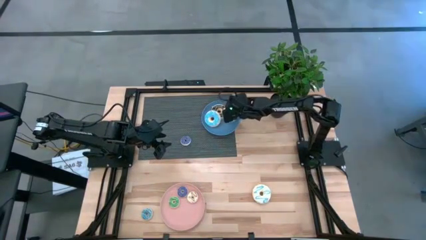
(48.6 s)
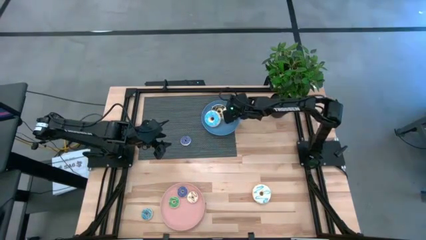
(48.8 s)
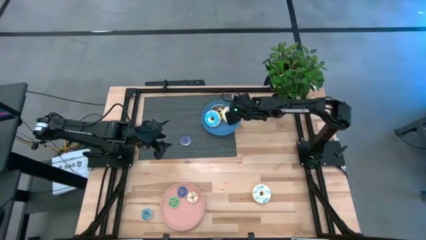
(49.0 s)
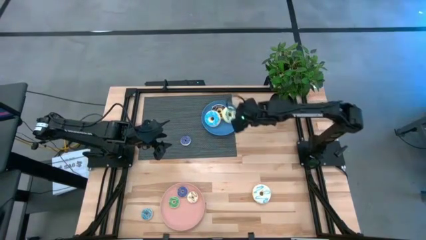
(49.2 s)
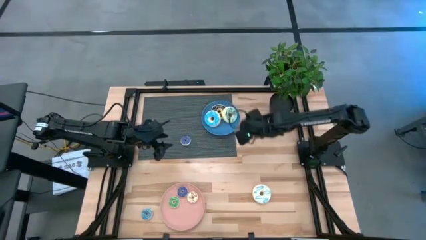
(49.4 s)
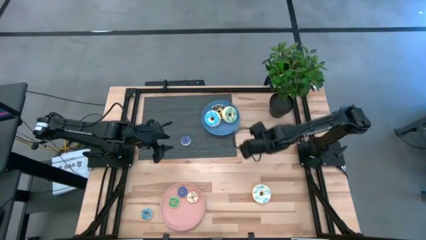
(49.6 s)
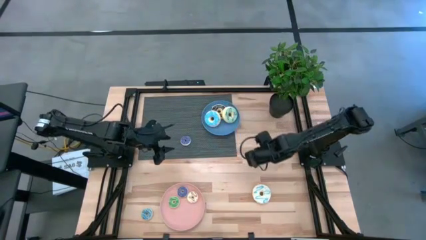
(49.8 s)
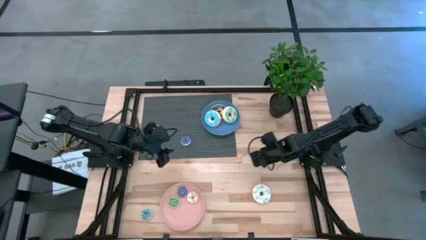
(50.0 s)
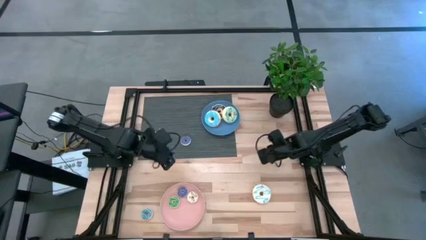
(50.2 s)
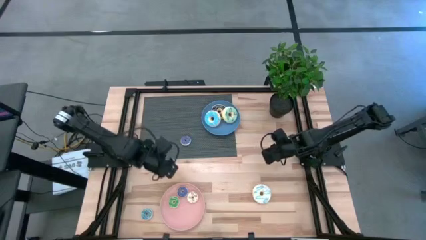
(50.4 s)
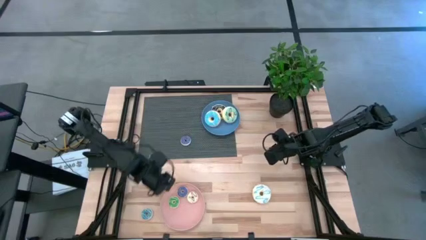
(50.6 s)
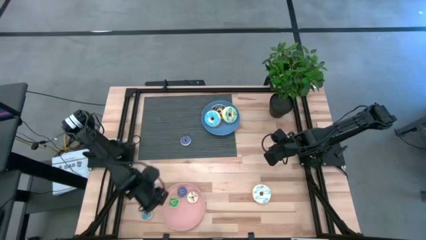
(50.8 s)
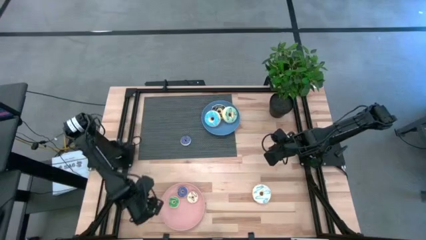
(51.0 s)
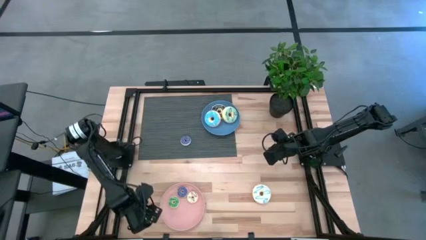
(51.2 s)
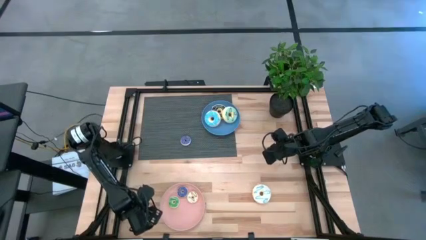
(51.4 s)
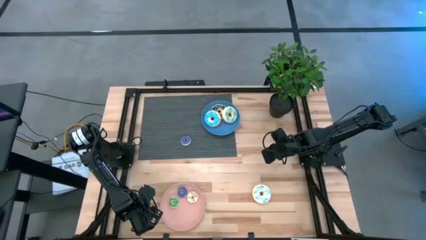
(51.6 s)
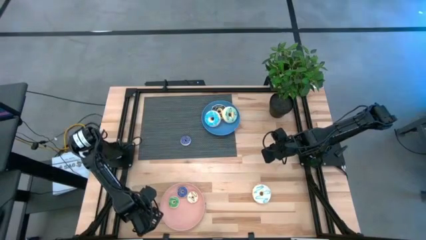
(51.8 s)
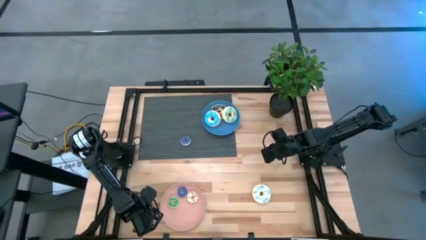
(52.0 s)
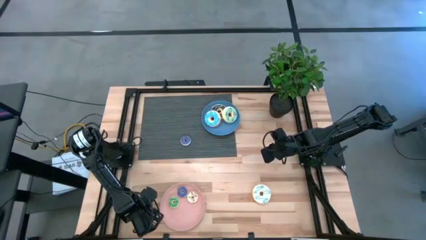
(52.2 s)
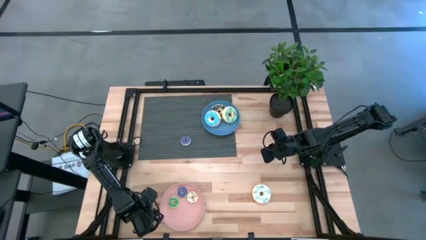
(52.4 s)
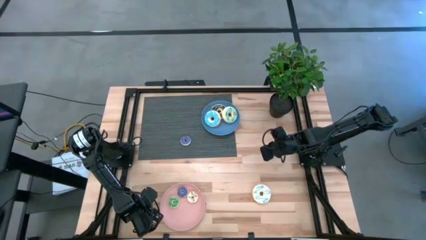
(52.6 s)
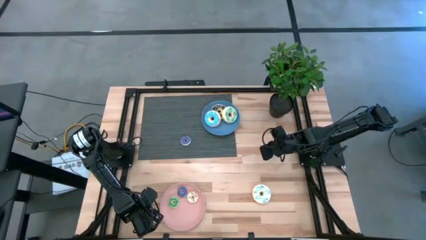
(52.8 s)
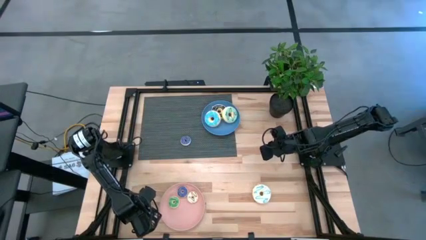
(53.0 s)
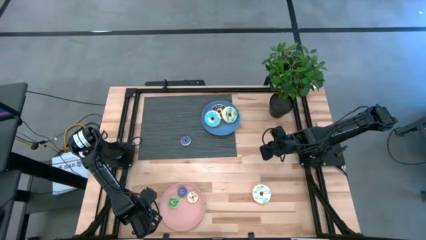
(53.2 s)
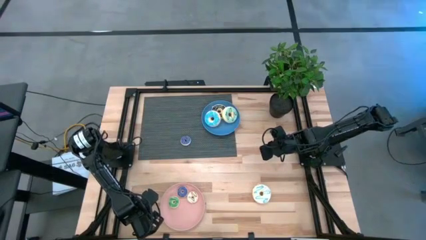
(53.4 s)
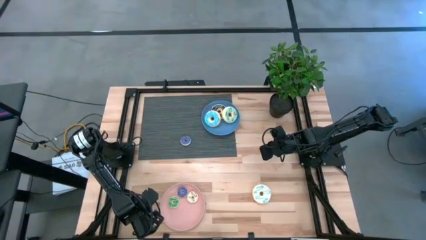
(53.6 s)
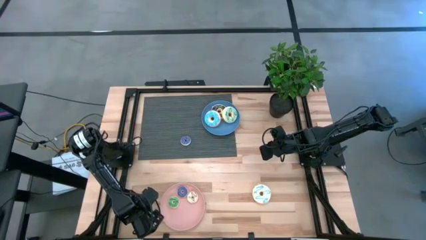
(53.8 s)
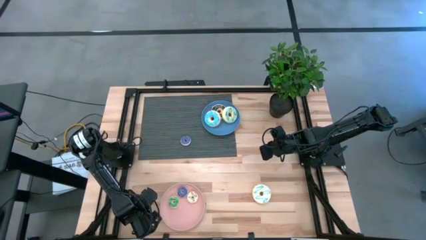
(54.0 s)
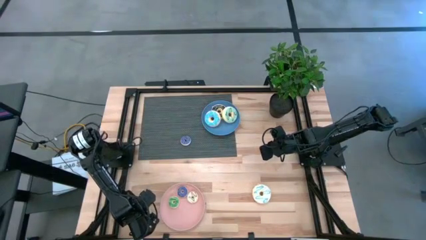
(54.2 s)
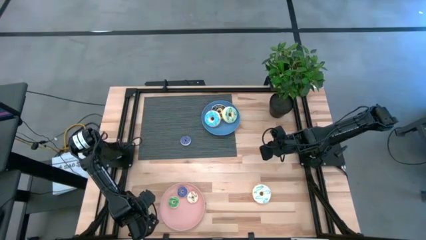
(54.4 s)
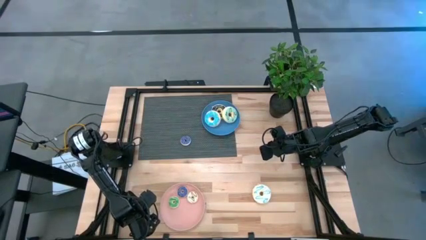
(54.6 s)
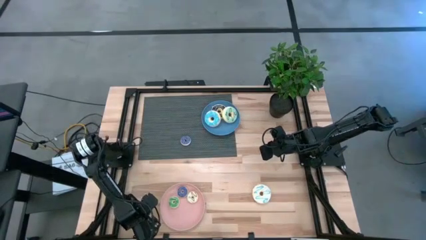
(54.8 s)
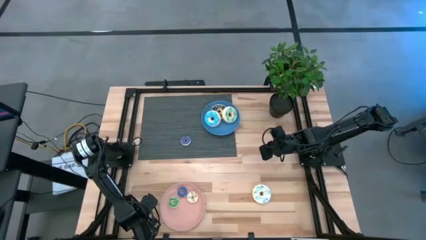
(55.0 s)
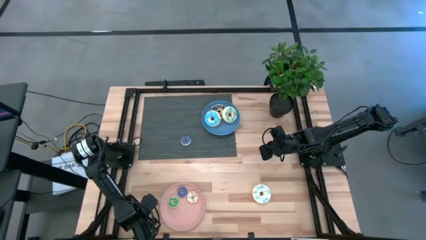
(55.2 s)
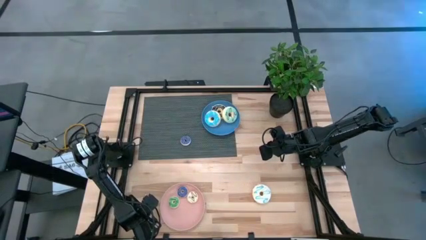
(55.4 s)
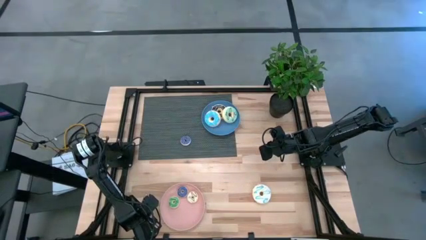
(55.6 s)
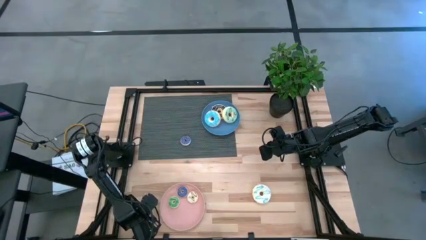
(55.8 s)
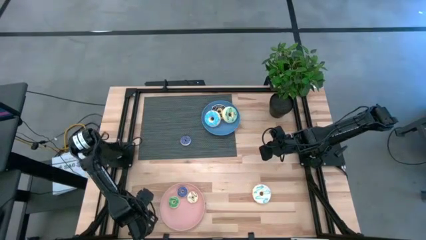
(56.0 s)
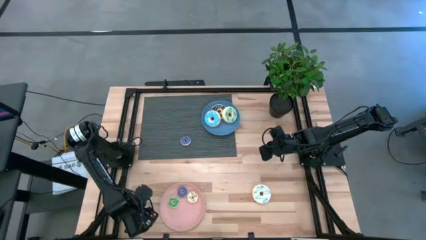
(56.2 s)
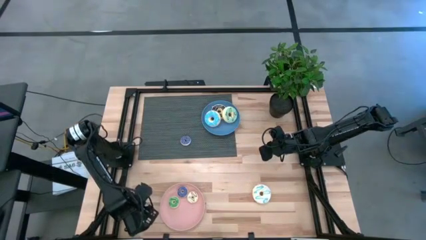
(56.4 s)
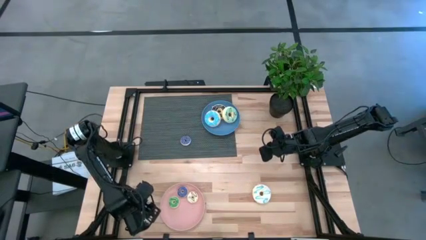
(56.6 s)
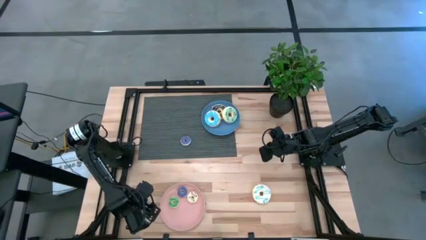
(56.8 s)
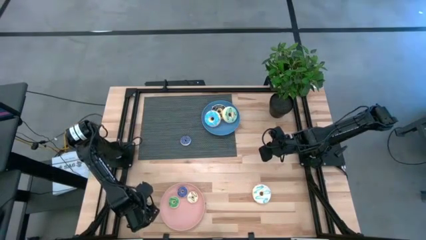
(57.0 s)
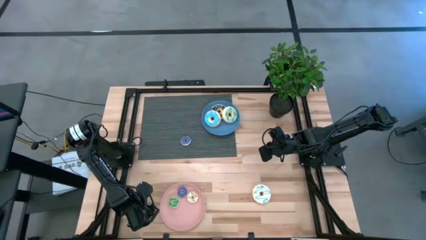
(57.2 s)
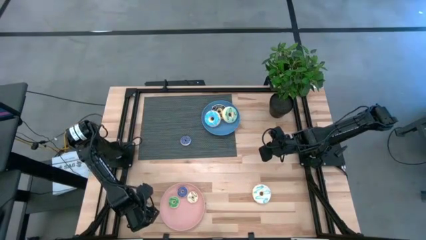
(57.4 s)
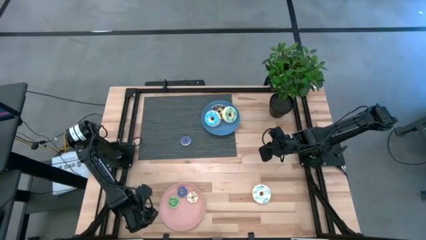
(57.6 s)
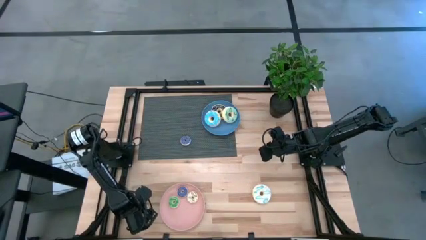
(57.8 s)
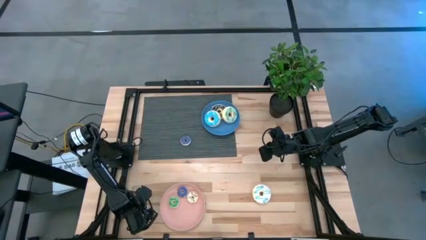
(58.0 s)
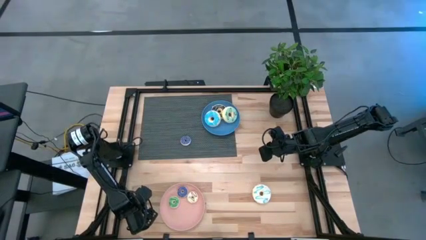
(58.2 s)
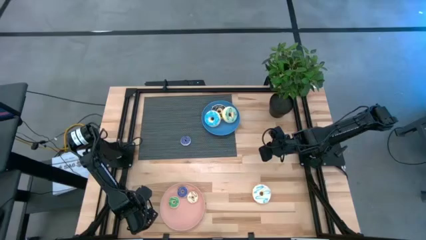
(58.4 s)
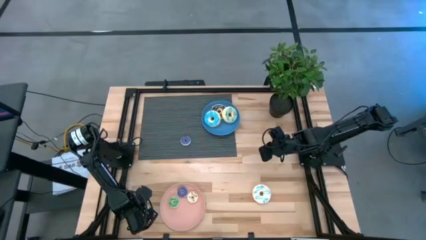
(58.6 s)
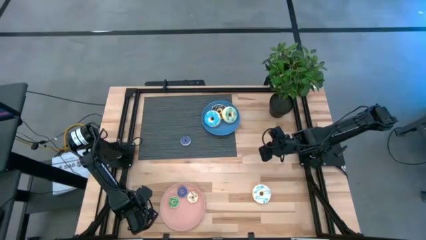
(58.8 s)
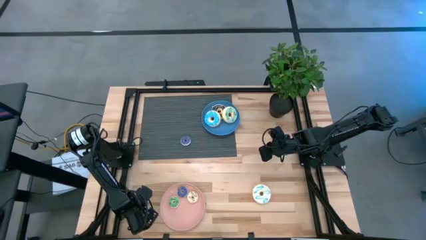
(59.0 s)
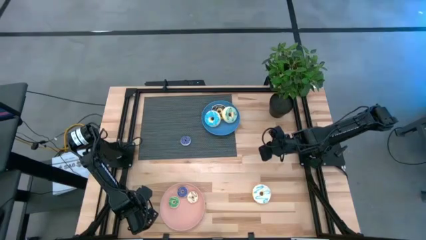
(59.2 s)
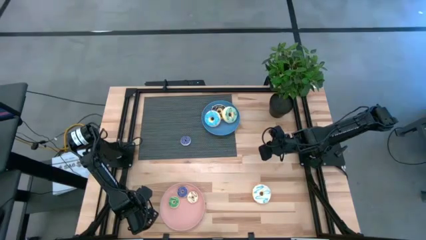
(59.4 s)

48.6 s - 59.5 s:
Task: Pick & Place donuts
Put the small light blue donut on the pink plate

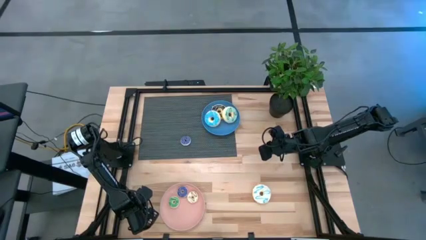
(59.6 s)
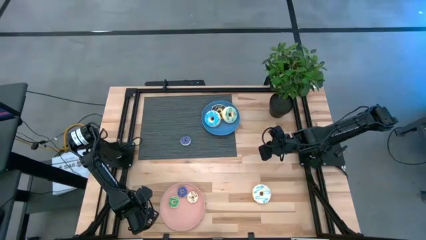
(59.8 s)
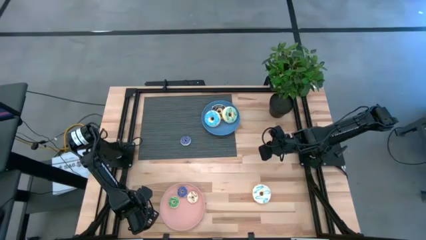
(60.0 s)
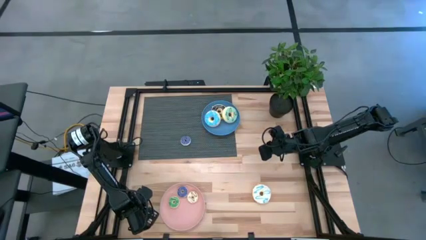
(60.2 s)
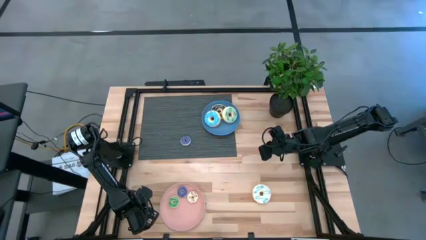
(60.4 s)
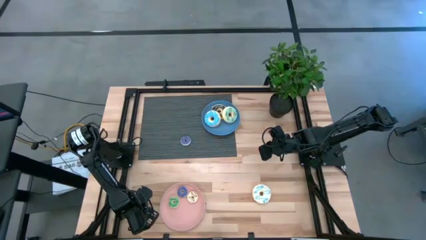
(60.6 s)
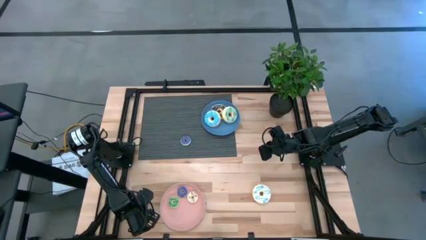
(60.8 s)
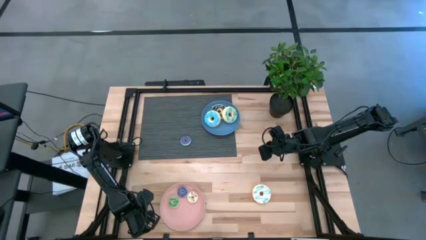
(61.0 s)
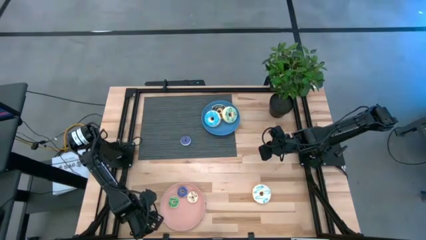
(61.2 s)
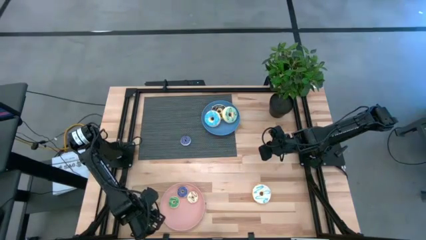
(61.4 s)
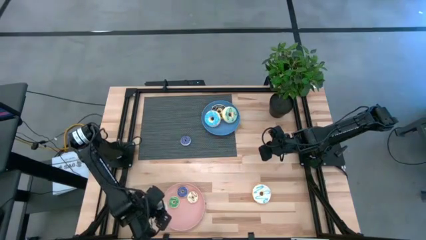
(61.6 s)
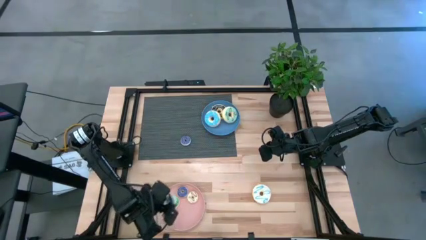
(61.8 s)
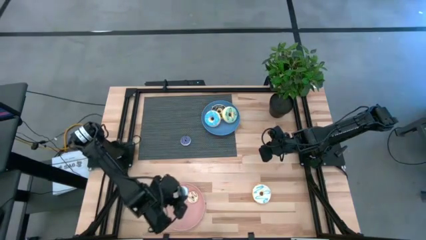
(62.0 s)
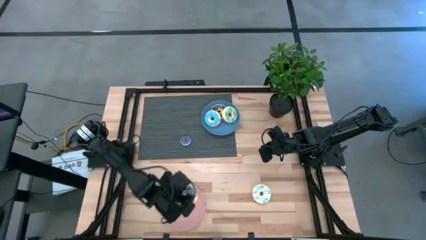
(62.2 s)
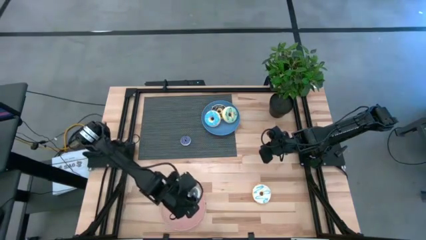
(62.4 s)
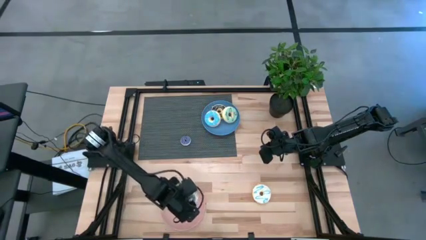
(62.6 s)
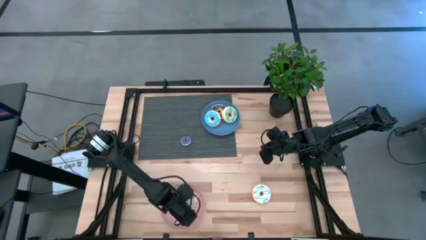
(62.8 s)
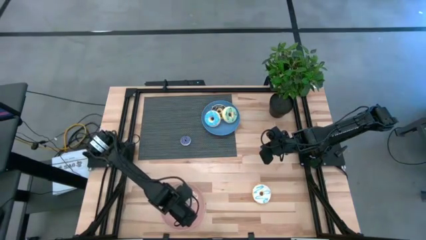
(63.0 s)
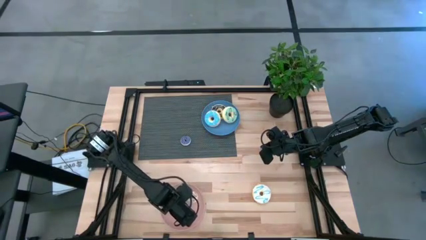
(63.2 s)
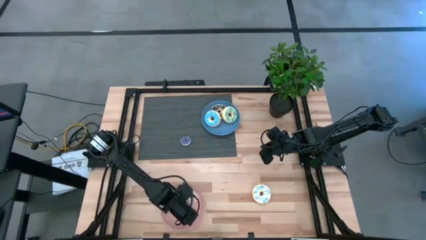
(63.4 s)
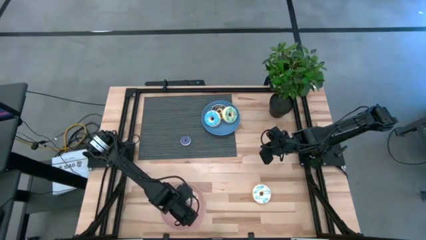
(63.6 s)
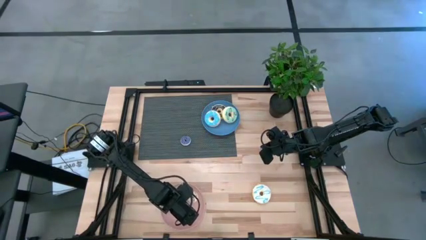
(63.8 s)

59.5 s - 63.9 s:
Put the small blue donut on the pink plate
